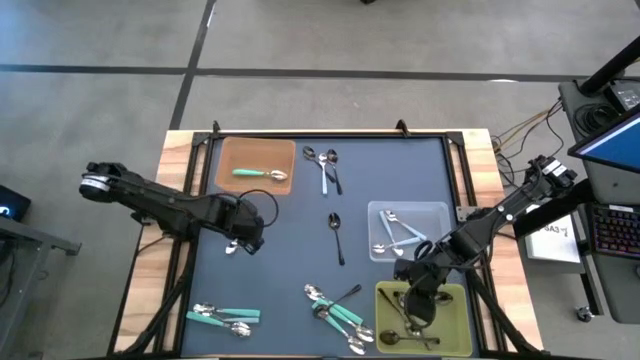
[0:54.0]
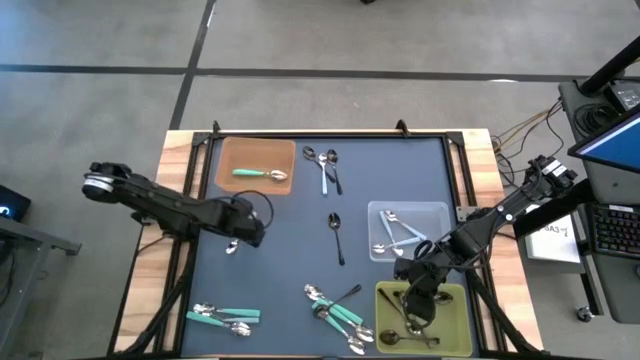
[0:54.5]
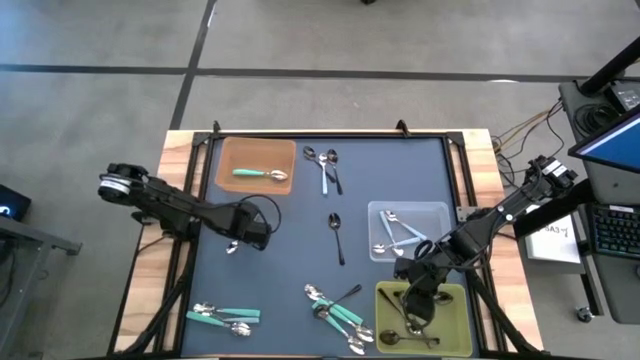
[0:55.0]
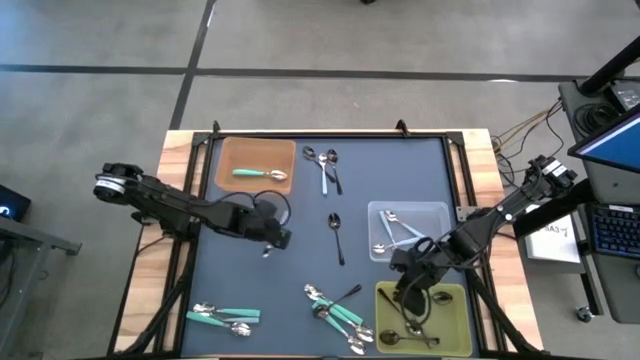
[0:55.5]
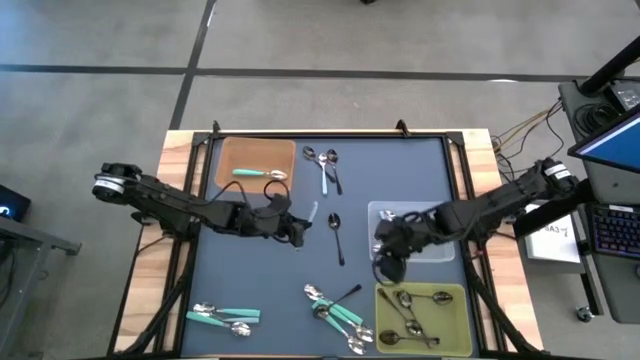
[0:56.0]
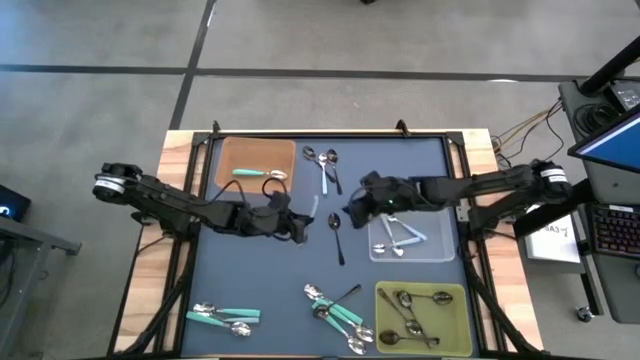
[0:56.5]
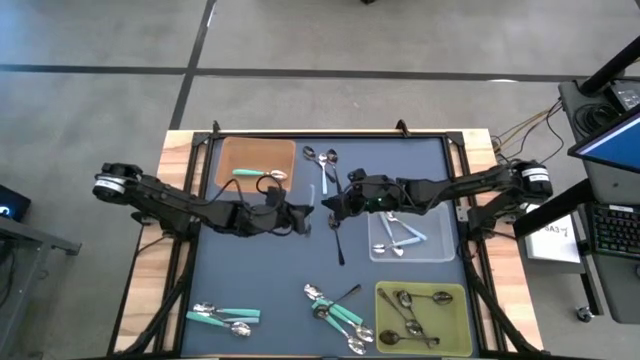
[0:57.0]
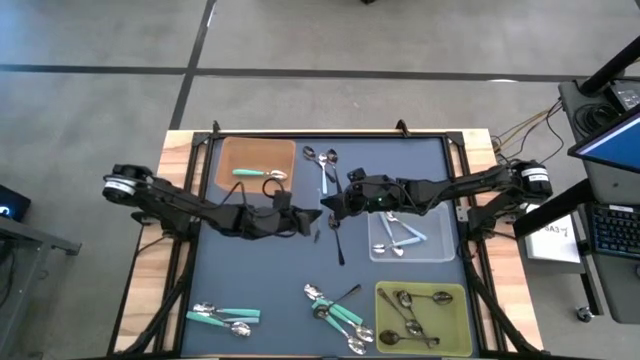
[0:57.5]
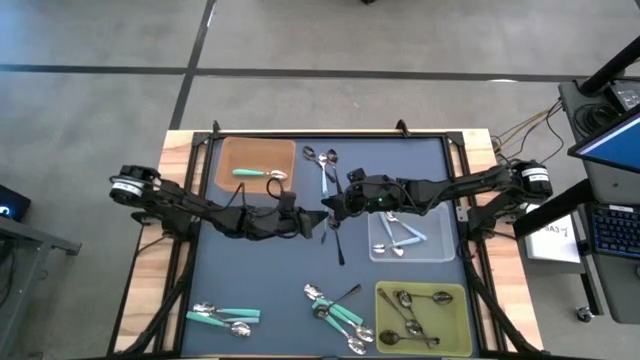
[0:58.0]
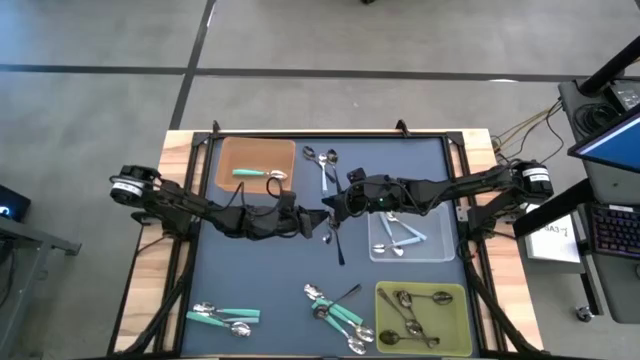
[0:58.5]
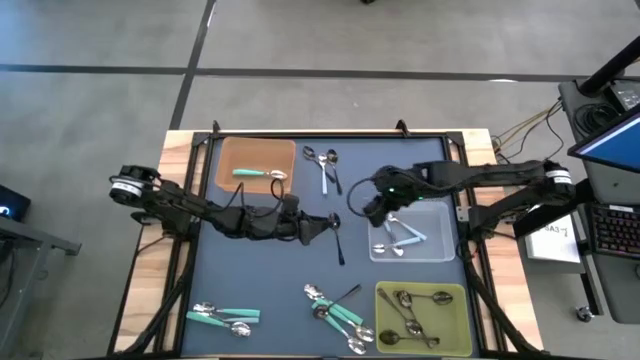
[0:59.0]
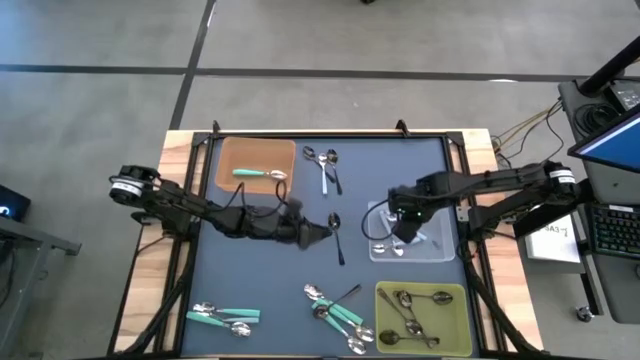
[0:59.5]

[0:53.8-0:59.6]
Task: Sort silverware by color (type)
Put the white spoon into the transparent bin

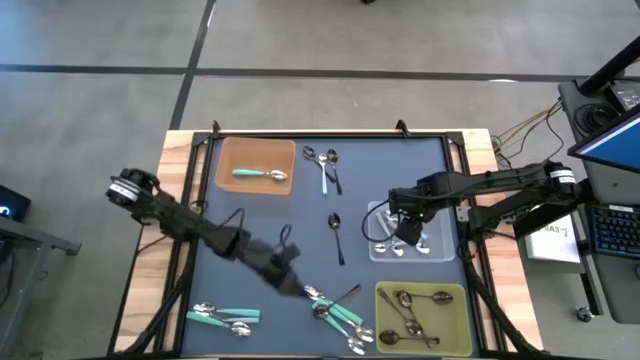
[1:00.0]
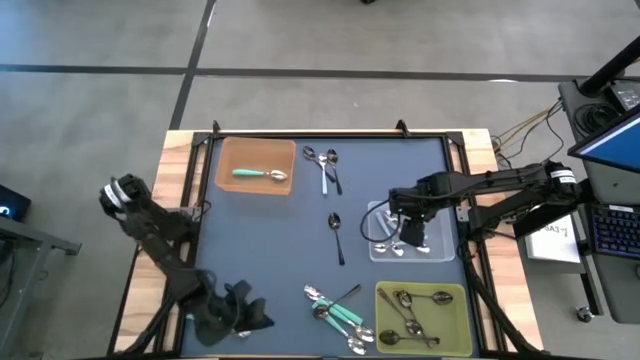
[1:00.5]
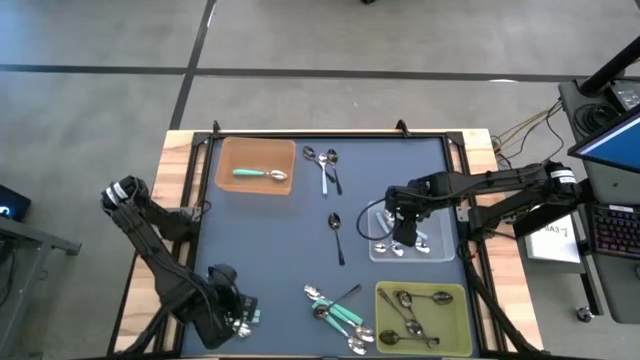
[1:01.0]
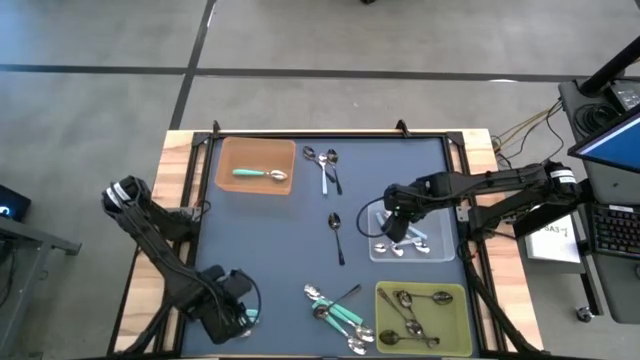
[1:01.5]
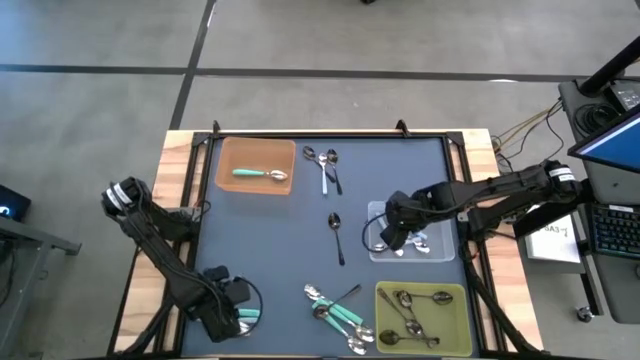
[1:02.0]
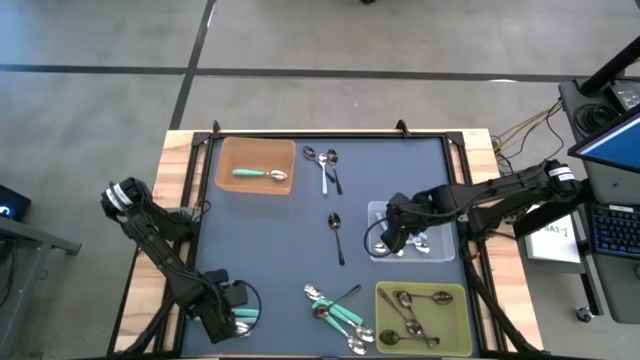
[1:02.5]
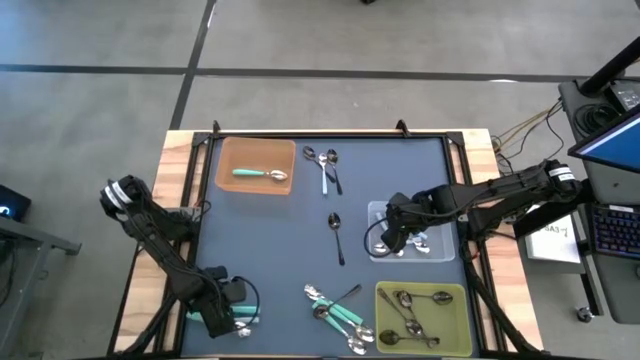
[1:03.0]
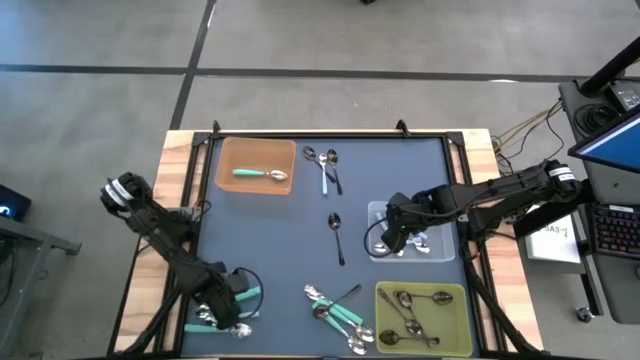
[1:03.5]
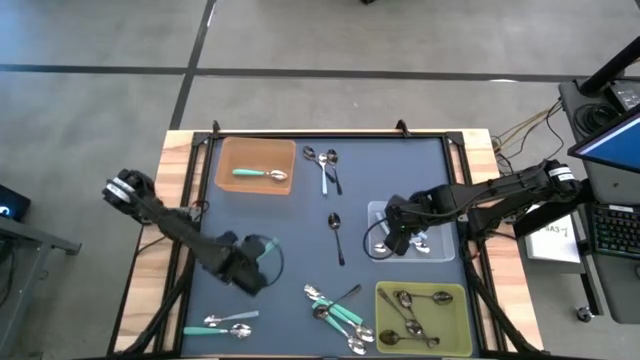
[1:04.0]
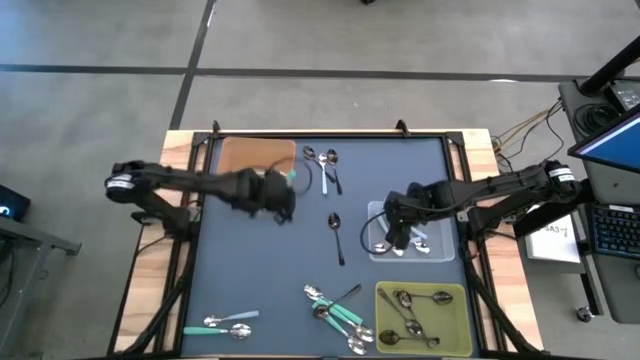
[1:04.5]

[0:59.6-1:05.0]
Put the green spoon into the orange bin

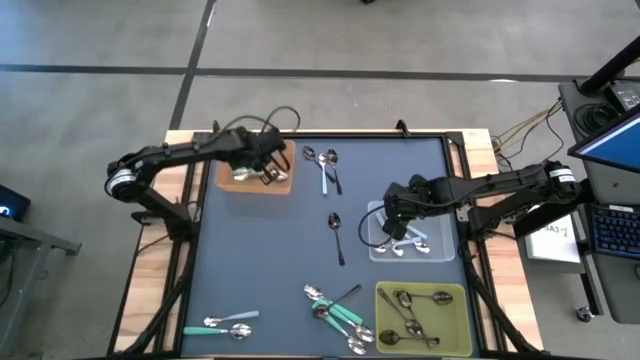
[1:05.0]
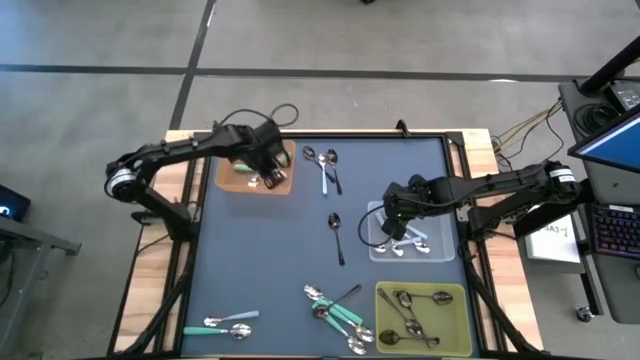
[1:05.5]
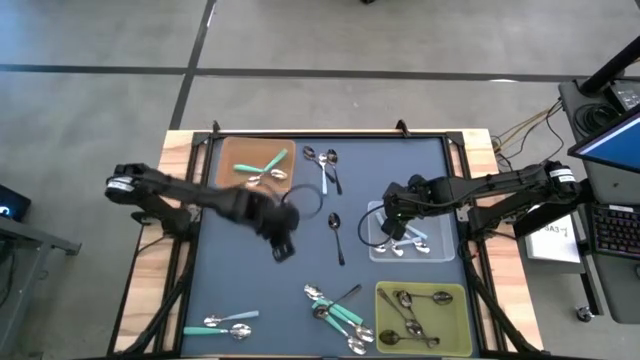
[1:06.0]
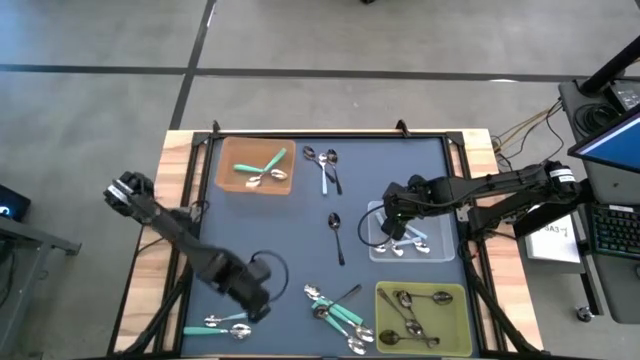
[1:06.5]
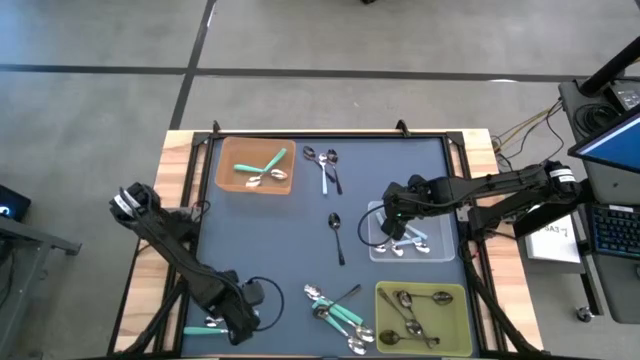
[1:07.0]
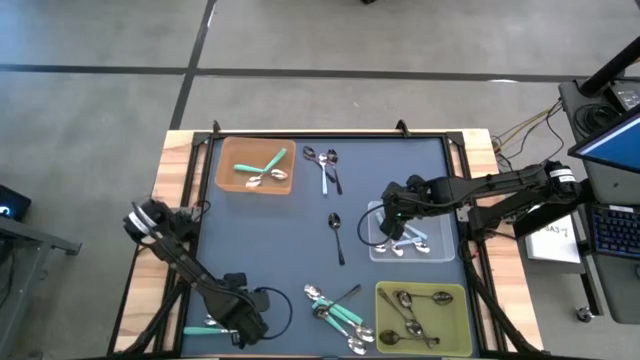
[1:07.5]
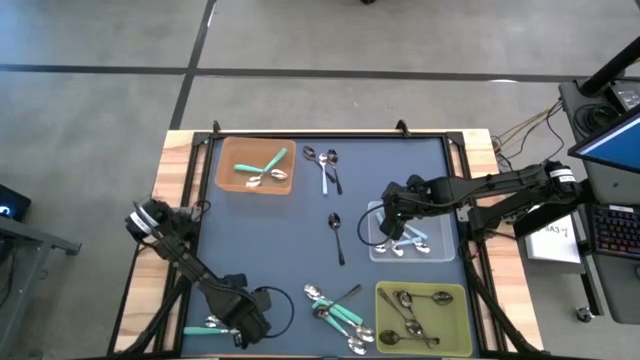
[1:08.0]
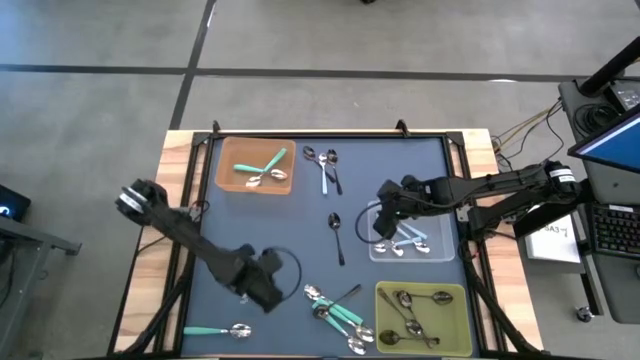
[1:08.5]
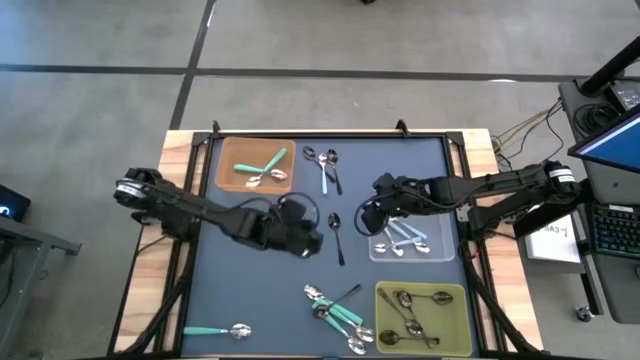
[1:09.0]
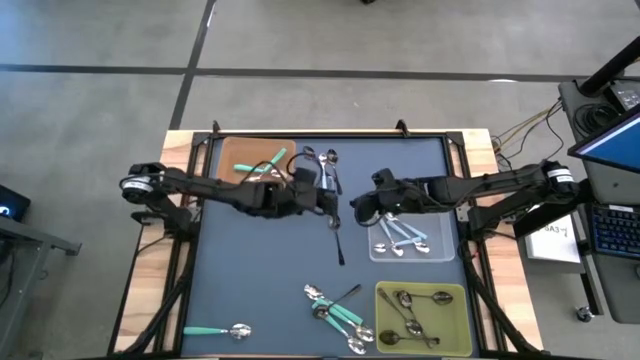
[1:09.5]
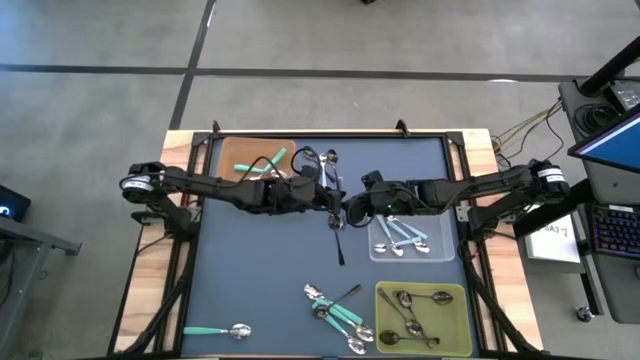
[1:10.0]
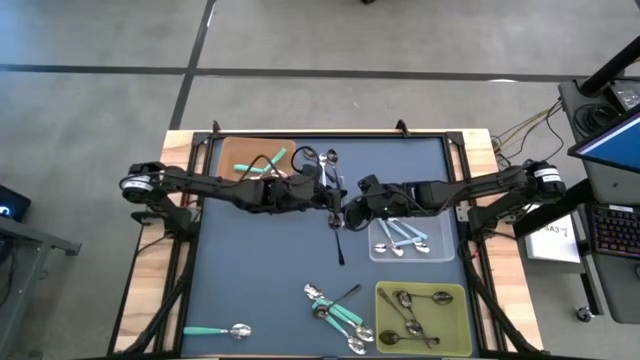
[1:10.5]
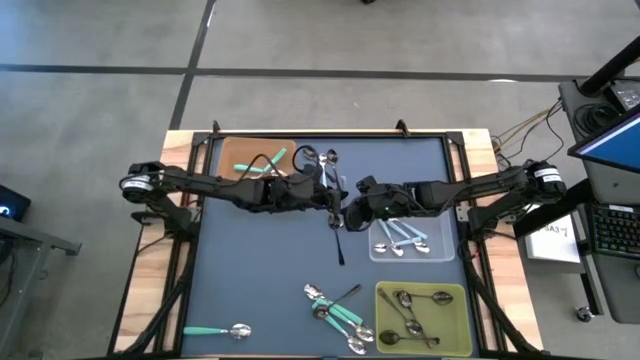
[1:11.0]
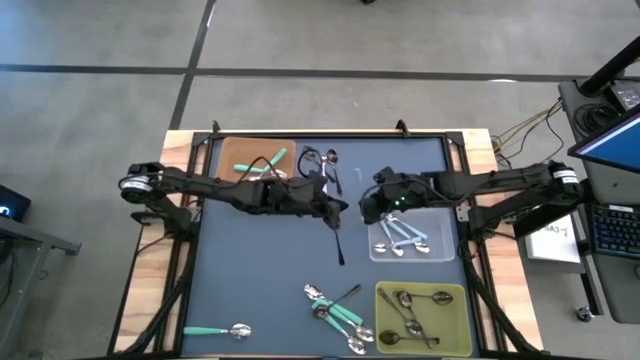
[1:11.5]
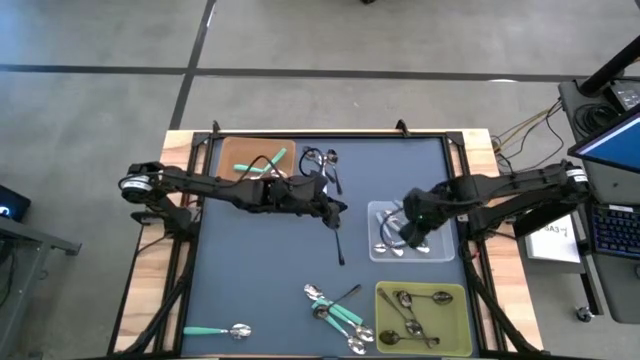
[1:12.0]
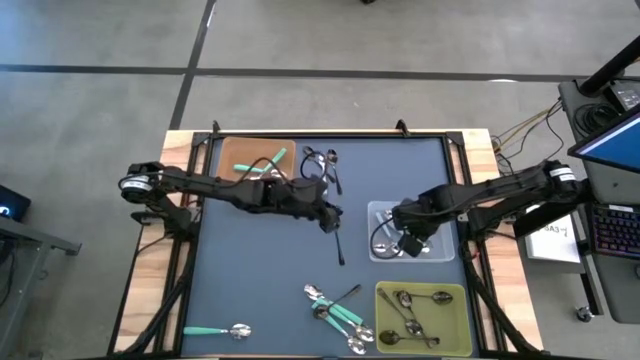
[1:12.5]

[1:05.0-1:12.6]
Put the white spoon into the transparent bin

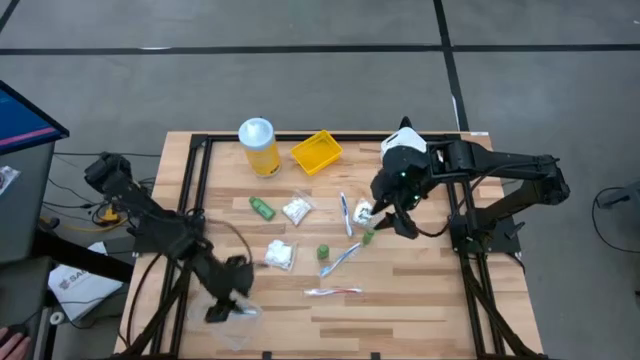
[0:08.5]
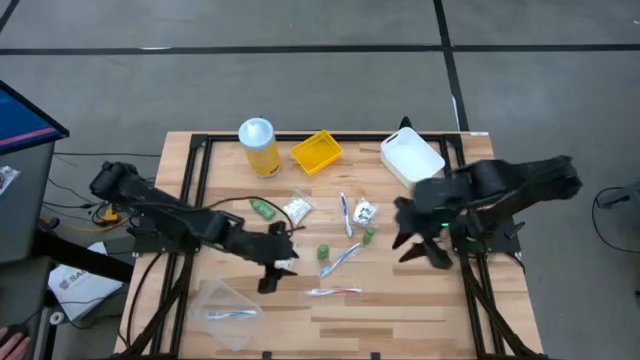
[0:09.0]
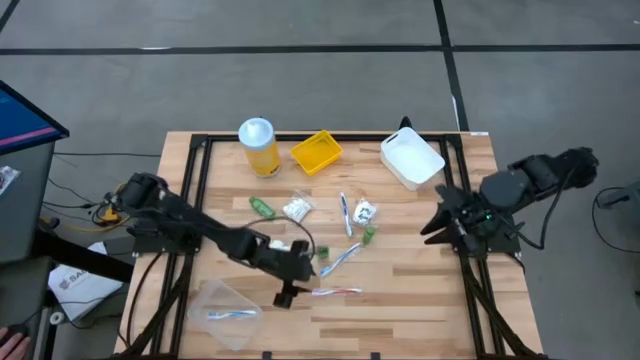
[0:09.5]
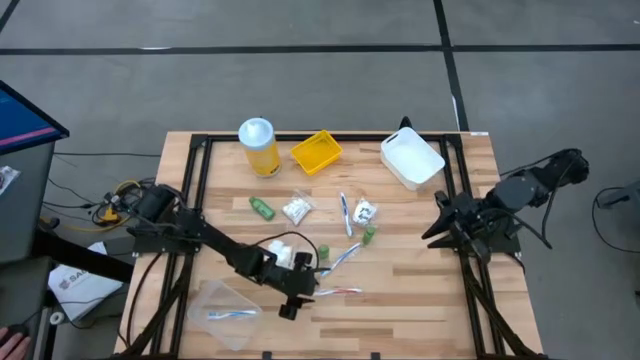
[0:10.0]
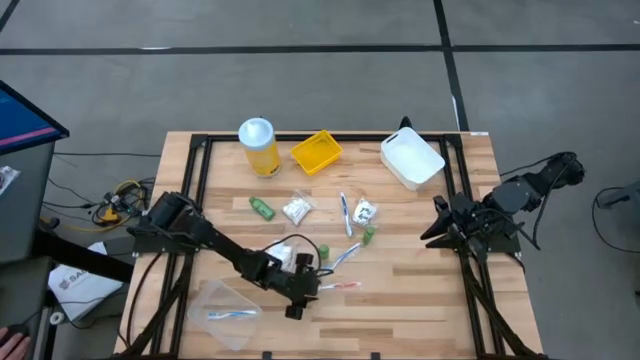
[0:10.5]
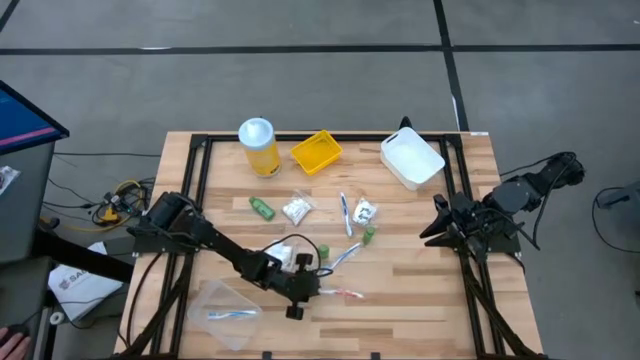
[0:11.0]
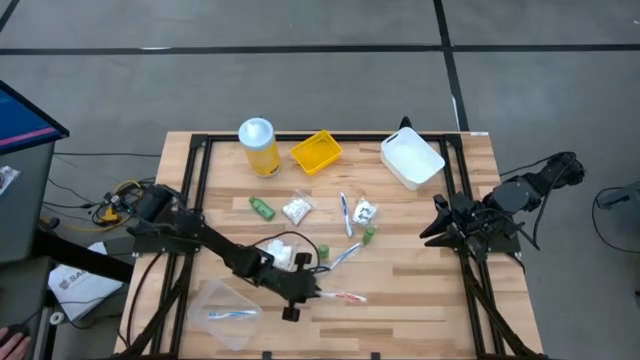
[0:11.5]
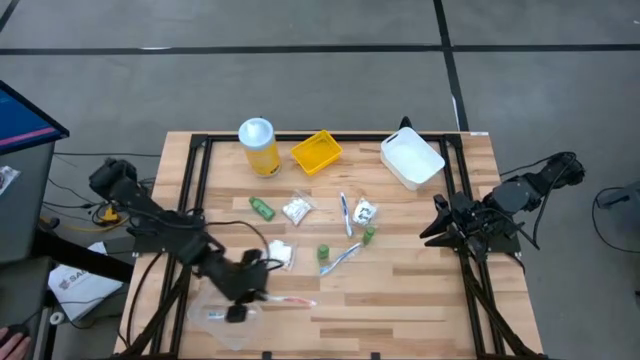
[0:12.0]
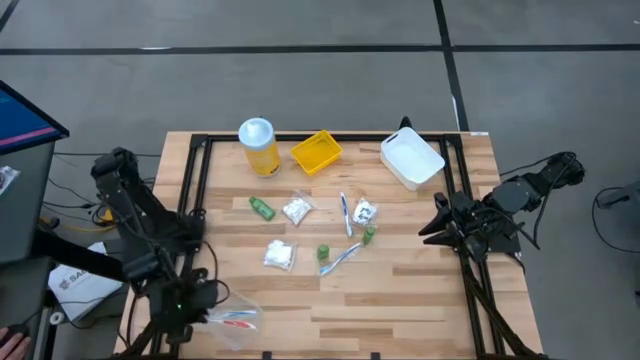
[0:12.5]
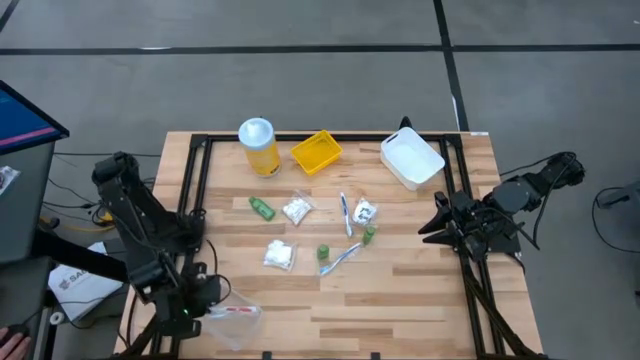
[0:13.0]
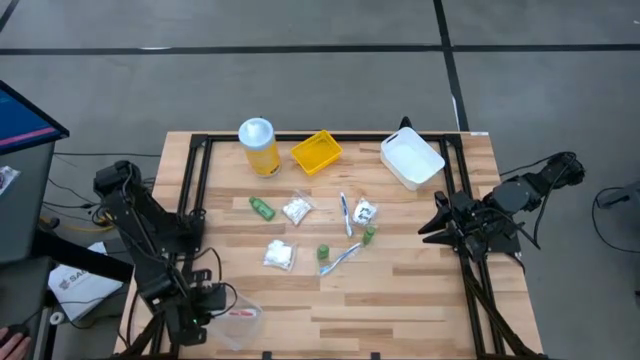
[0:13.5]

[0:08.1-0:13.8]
Task: Pick & Place Travel size toiletries
Put the orange toothbrush into the transparent bin
